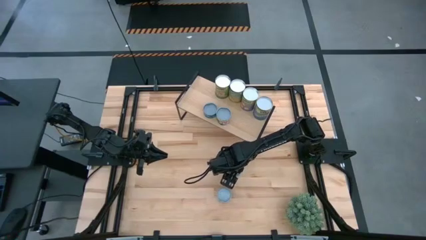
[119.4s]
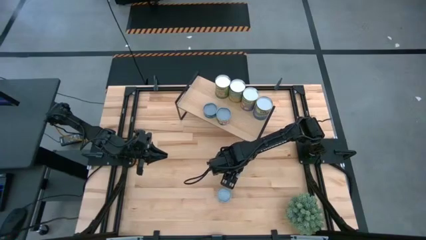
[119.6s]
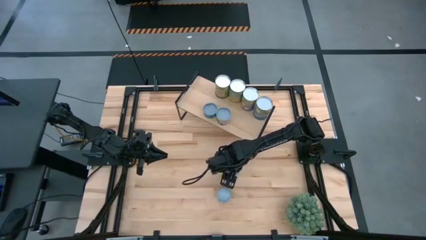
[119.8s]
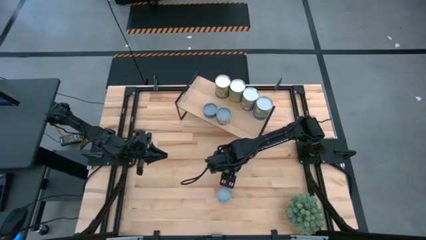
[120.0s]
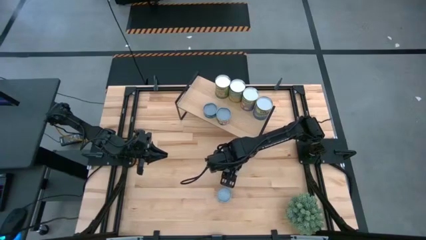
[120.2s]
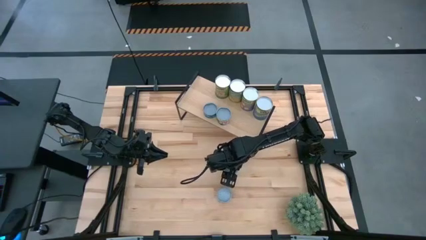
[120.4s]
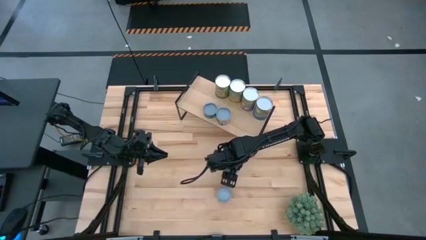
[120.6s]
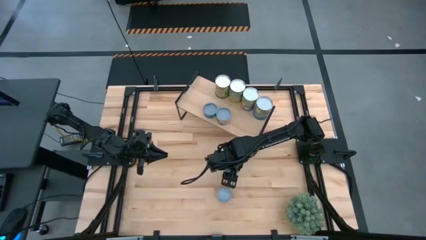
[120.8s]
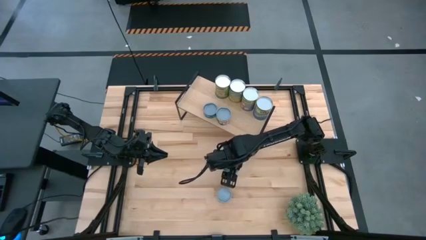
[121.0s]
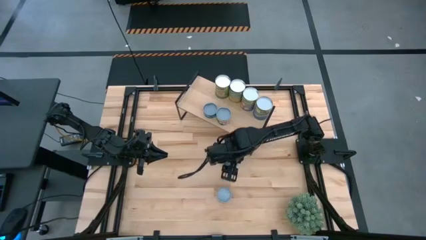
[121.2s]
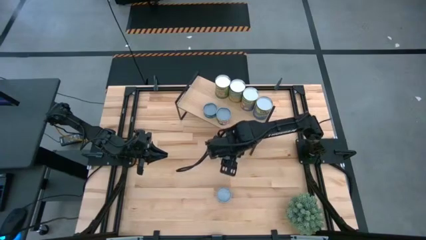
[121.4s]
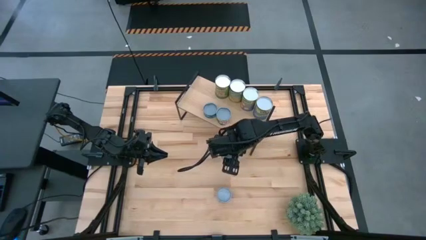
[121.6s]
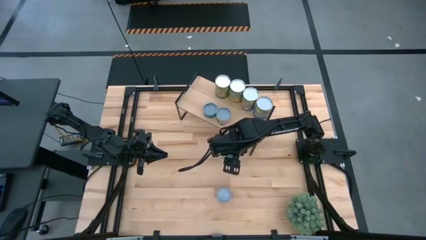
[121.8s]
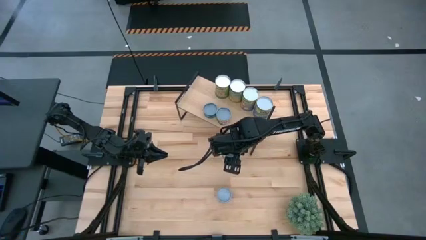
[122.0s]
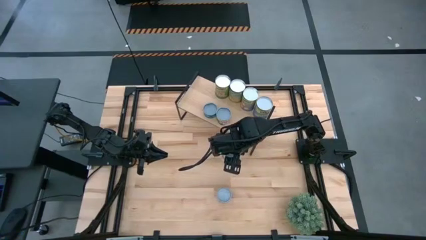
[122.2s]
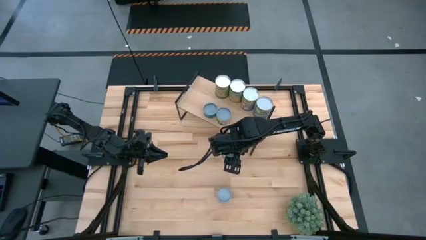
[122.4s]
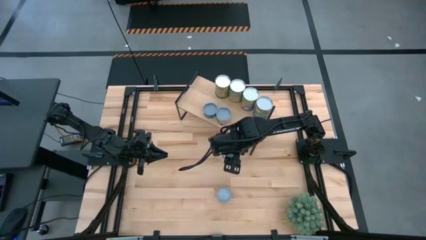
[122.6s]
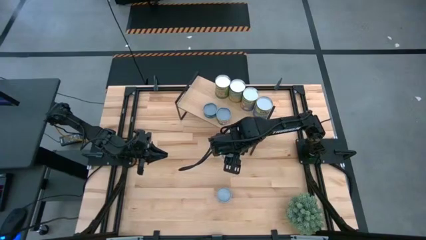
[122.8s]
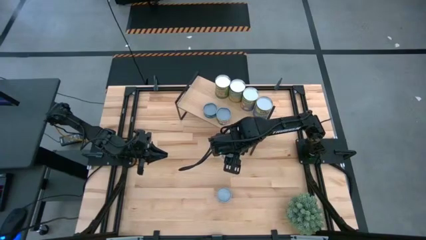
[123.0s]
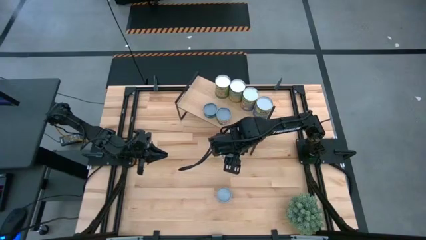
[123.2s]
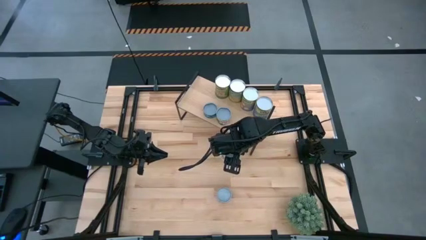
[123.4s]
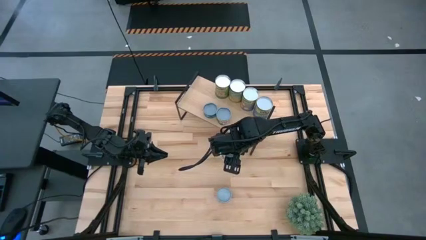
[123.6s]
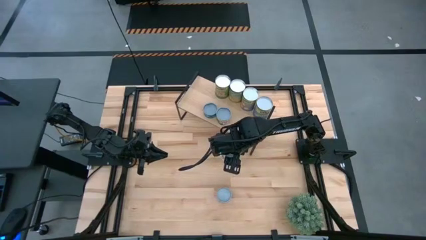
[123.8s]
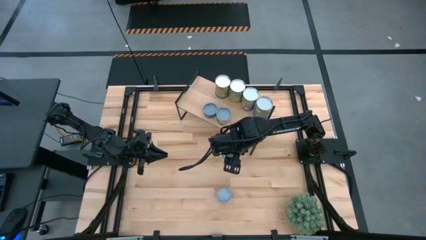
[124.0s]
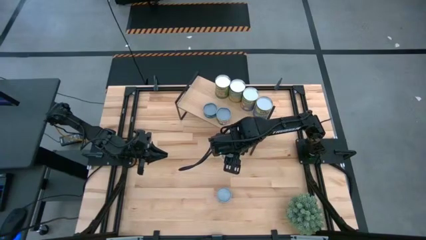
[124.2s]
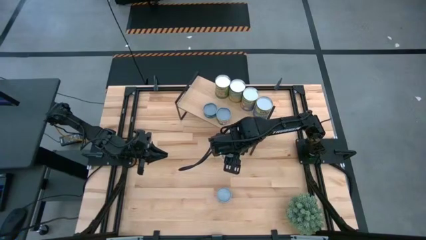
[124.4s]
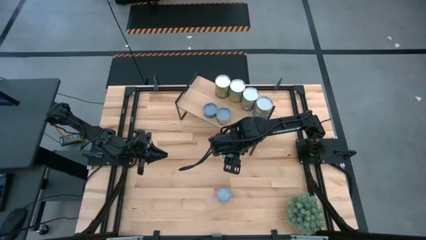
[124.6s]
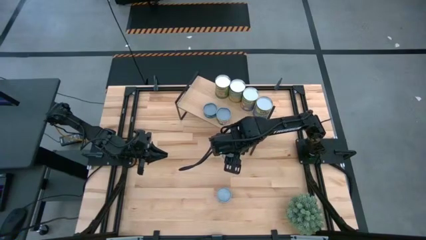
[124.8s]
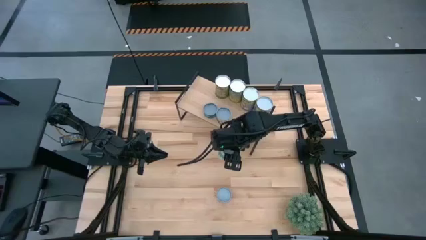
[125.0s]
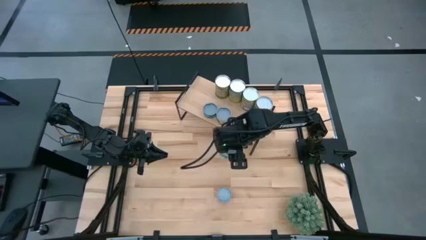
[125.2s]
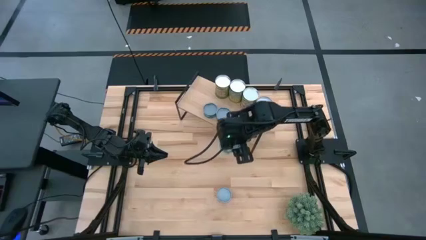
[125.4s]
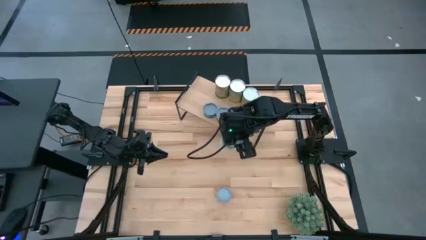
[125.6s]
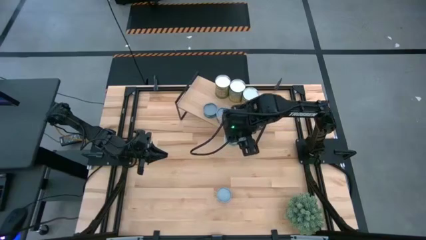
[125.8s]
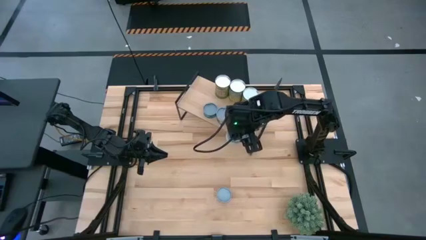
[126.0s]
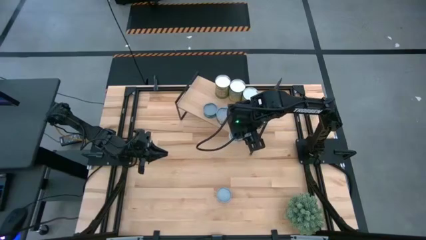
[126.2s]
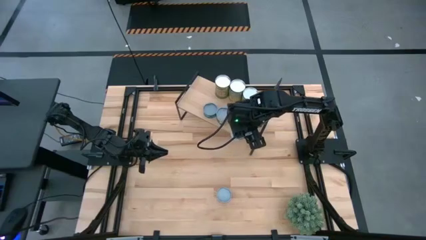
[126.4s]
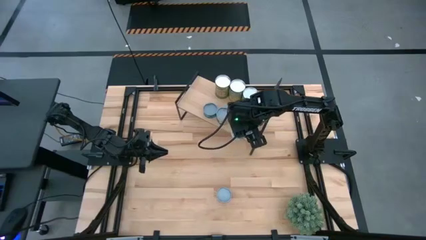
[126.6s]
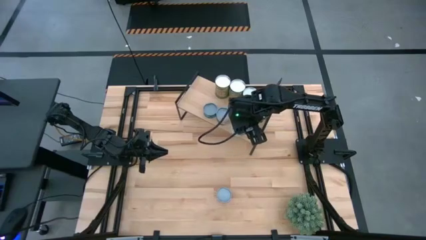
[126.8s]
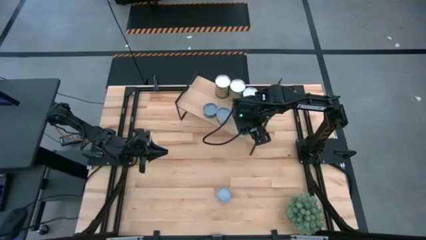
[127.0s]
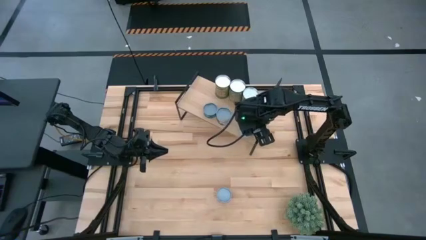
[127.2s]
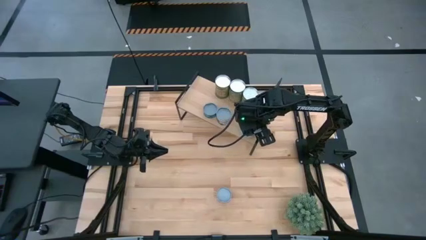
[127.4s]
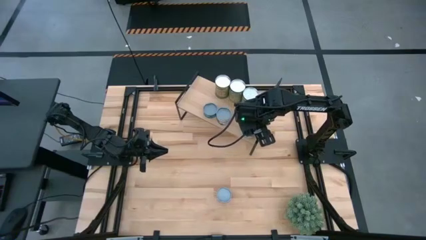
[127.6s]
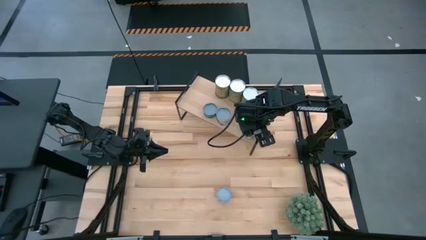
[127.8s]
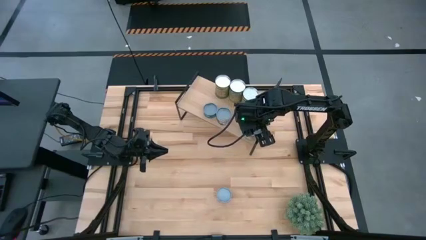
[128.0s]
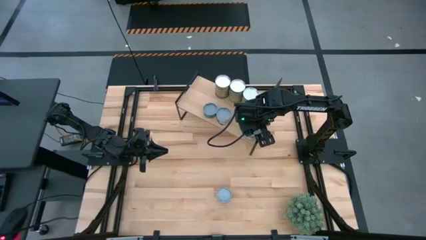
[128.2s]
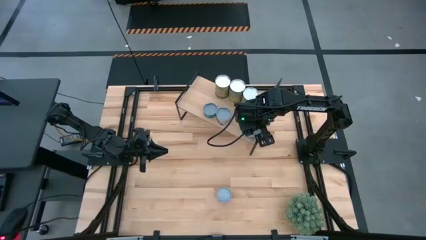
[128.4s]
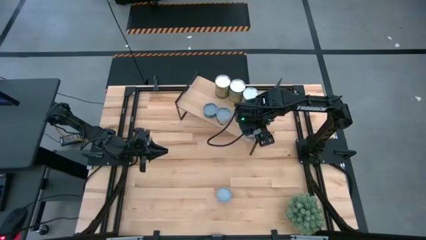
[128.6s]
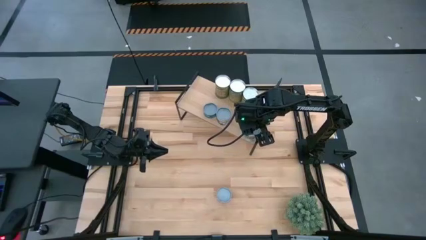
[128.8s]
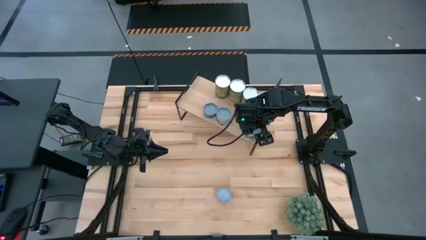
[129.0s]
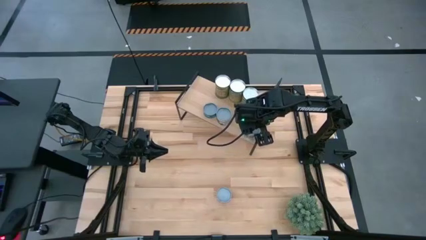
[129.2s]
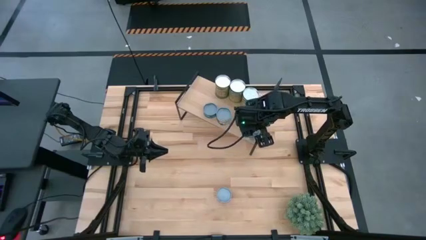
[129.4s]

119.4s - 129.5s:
Task: Pick and place cans onto a shelf
Put the white canned mixed vegetables on the shelf

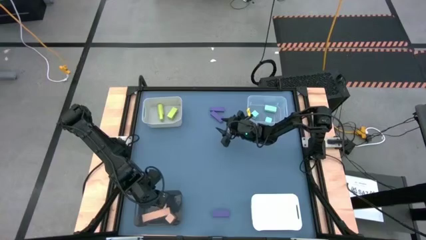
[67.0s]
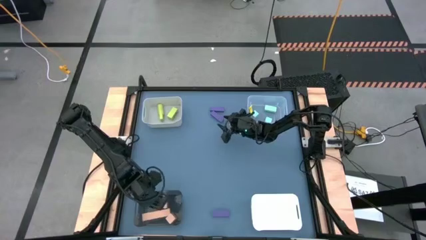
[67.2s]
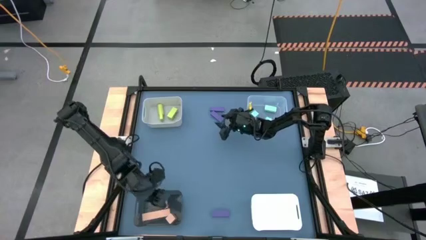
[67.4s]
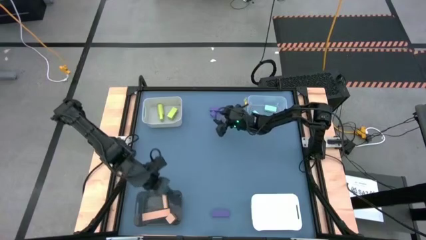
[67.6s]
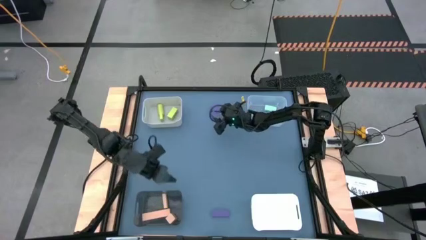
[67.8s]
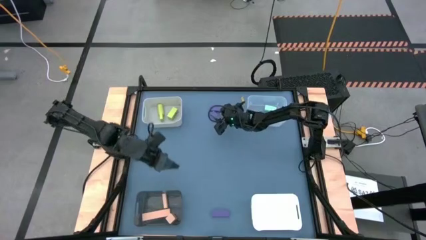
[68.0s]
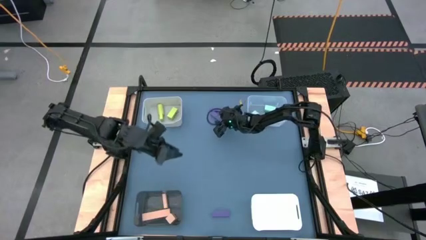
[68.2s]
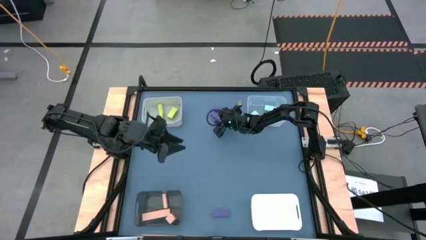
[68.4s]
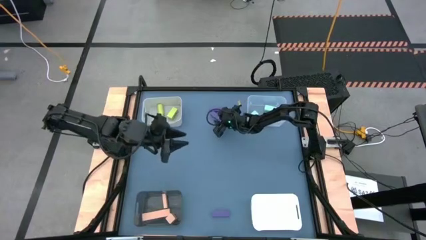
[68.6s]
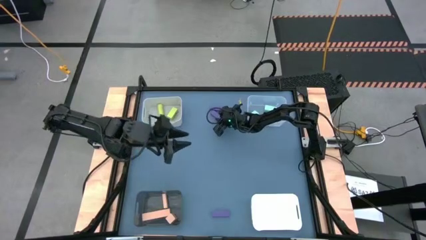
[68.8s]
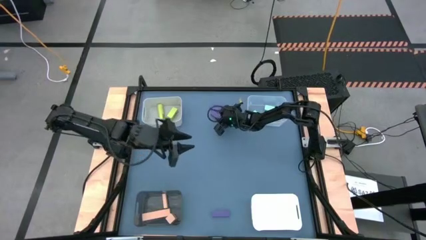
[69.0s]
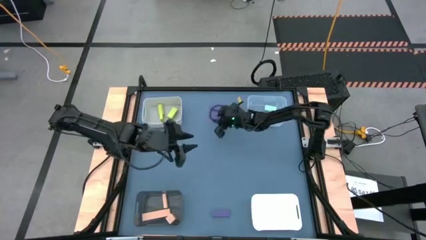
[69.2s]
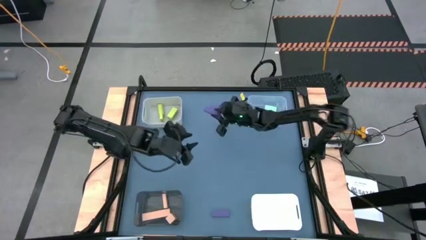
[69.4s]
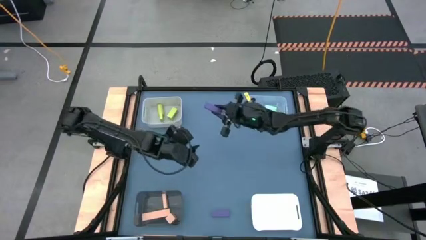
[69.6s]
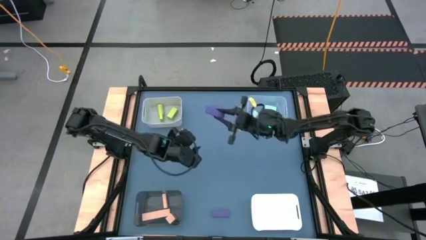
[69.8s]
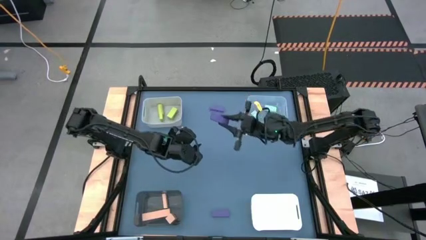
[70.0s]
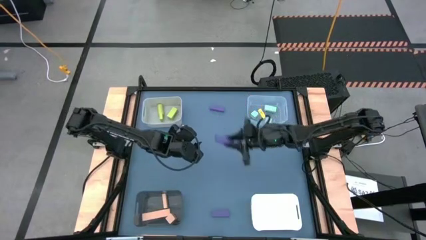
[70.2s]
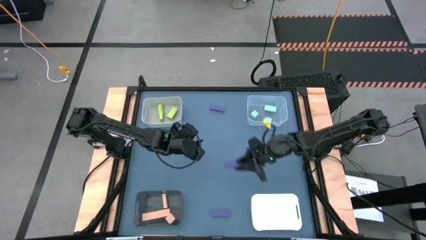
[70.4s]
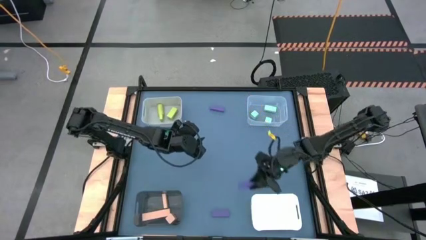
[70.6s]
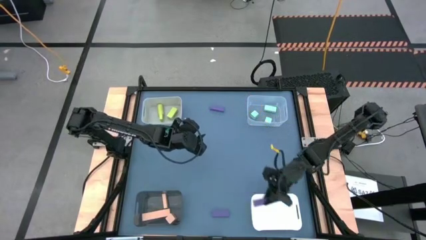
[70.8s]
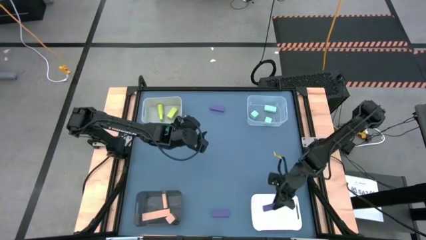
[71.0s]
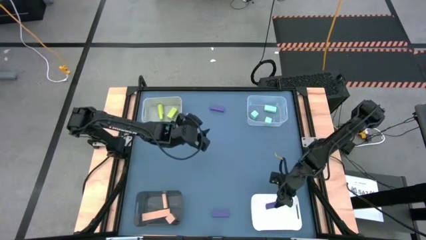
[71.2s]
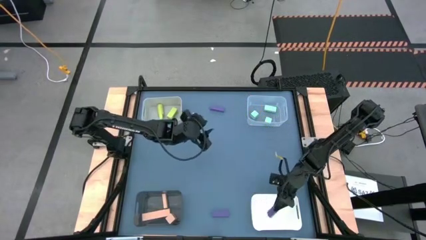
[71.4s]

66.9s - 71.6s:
Task: Sort & place blocks by color
Put the purple block into the white bin
